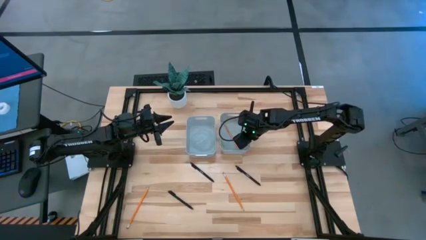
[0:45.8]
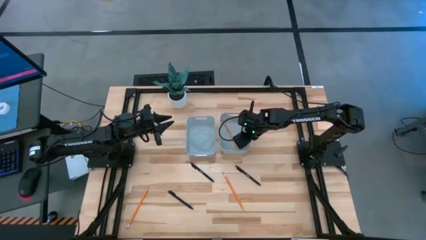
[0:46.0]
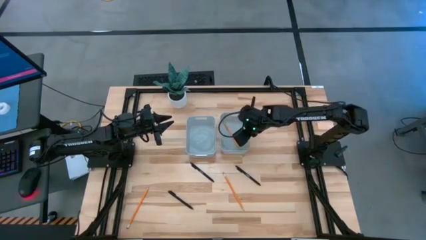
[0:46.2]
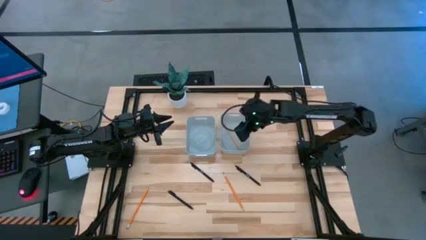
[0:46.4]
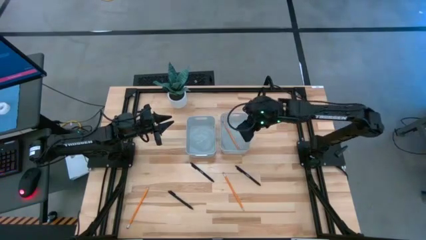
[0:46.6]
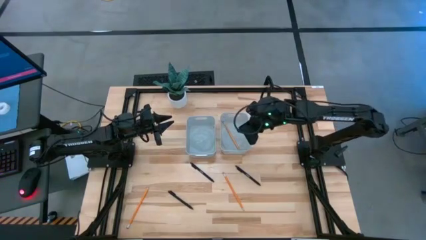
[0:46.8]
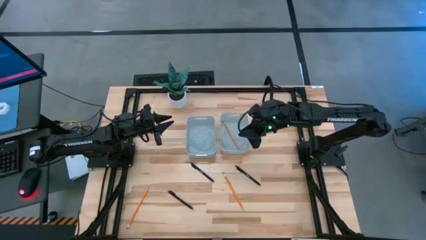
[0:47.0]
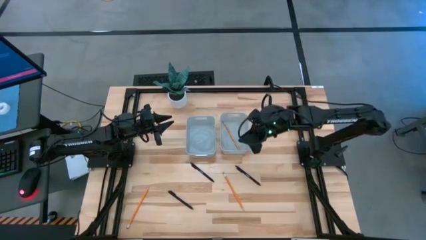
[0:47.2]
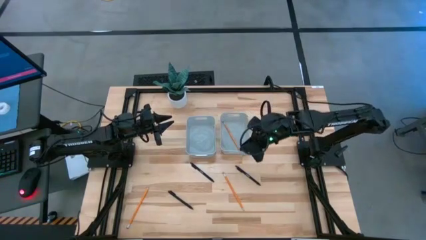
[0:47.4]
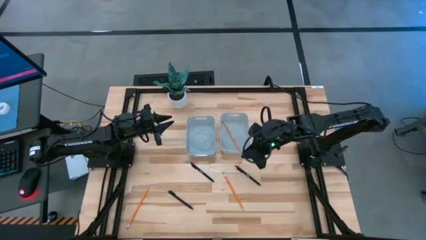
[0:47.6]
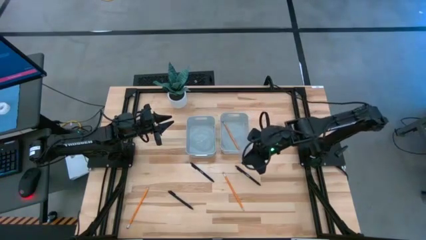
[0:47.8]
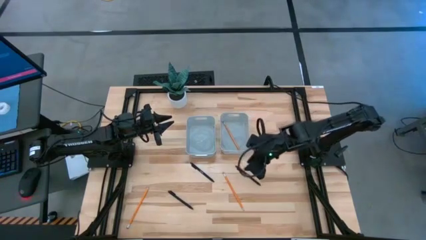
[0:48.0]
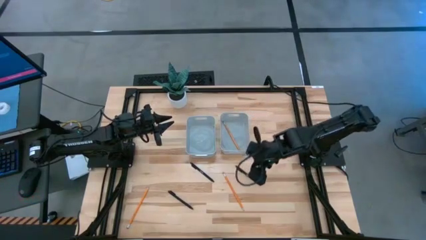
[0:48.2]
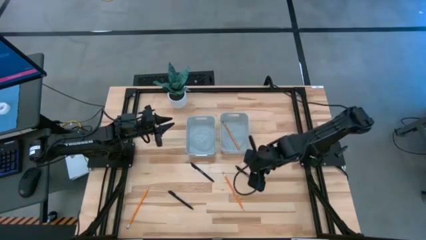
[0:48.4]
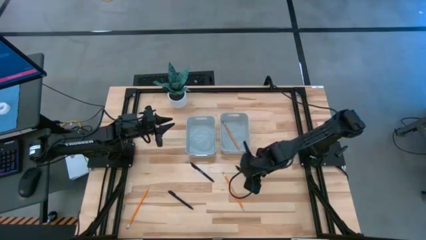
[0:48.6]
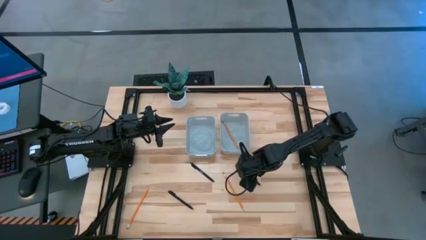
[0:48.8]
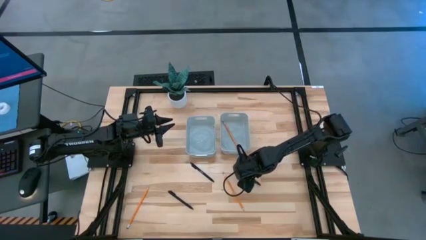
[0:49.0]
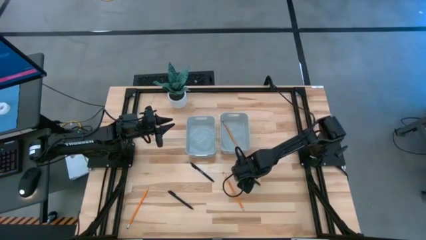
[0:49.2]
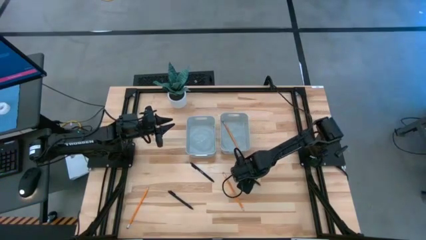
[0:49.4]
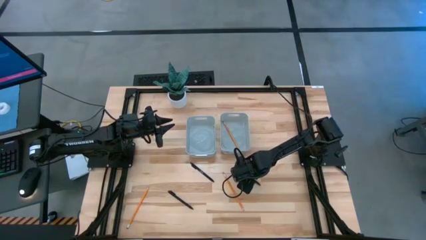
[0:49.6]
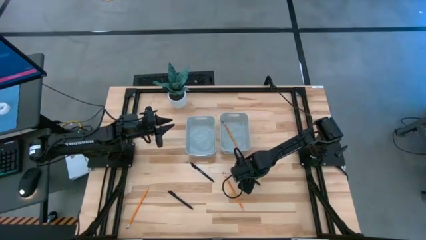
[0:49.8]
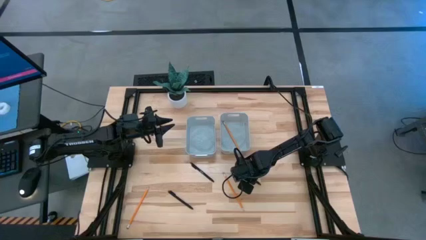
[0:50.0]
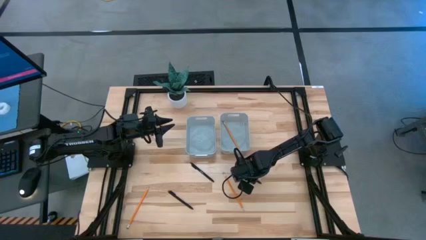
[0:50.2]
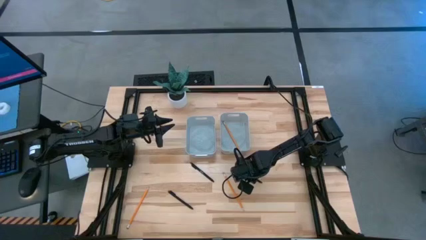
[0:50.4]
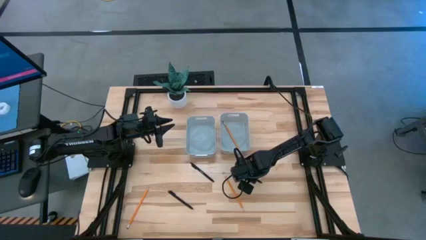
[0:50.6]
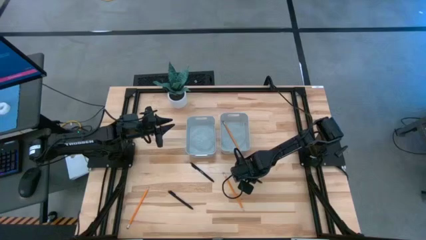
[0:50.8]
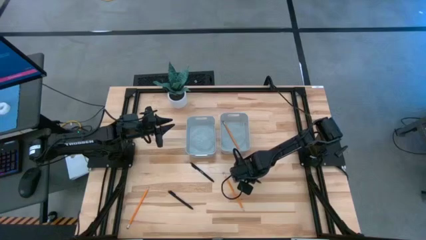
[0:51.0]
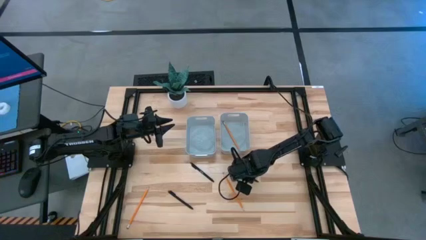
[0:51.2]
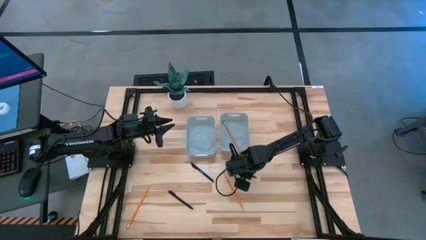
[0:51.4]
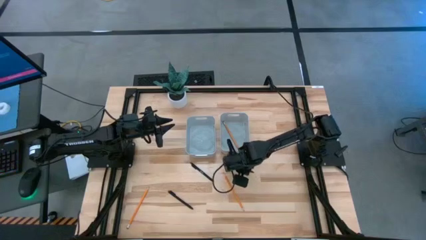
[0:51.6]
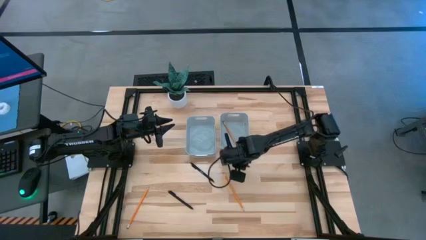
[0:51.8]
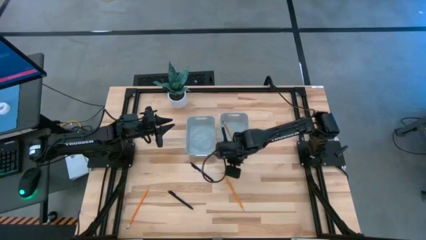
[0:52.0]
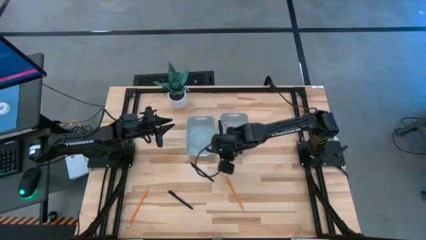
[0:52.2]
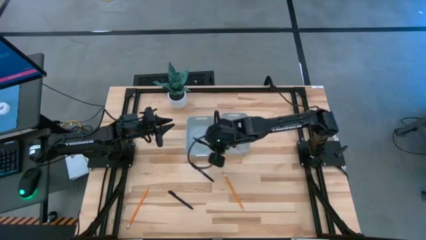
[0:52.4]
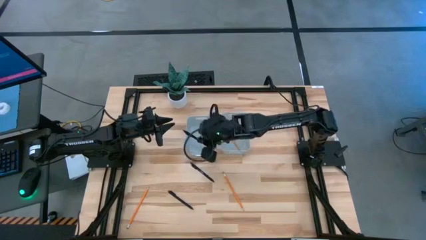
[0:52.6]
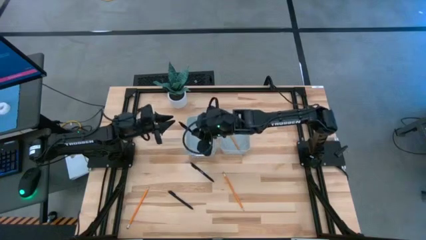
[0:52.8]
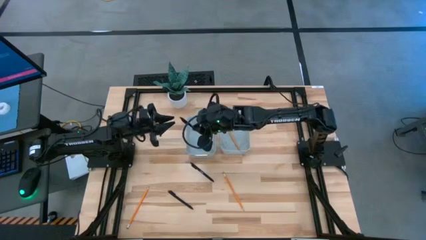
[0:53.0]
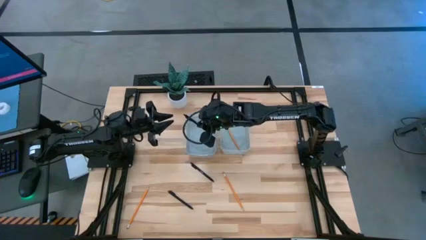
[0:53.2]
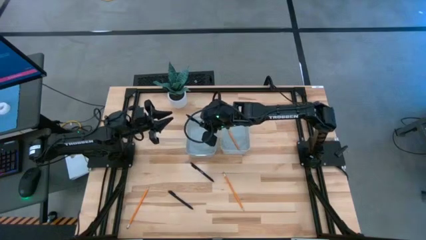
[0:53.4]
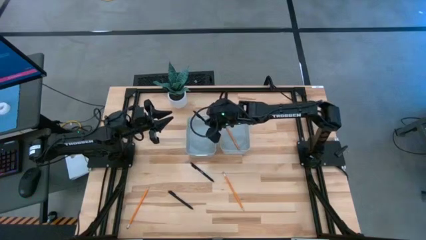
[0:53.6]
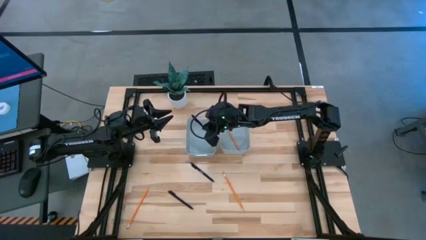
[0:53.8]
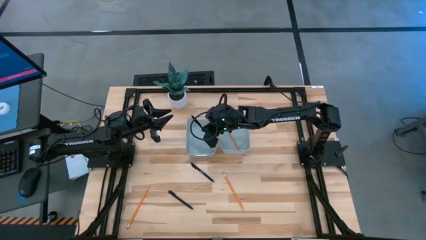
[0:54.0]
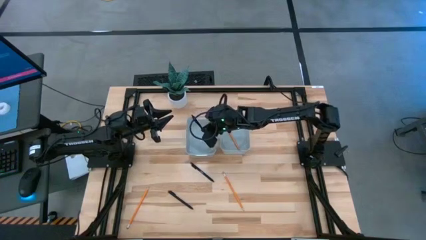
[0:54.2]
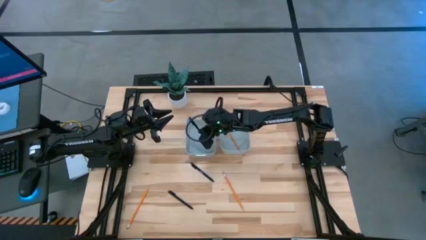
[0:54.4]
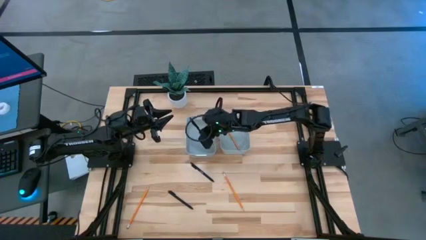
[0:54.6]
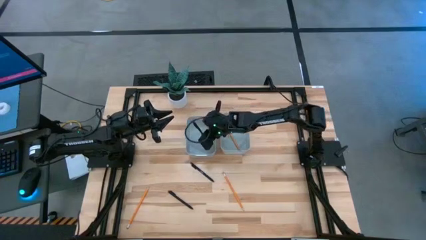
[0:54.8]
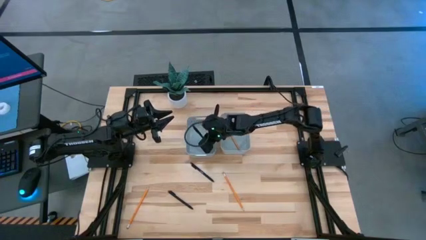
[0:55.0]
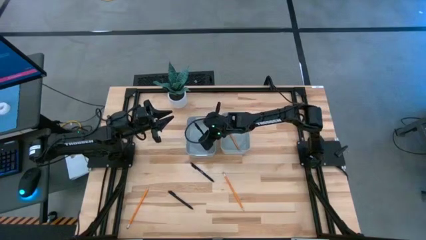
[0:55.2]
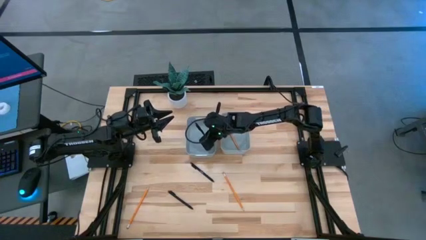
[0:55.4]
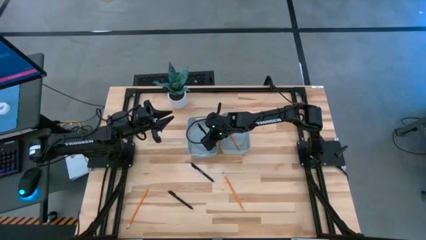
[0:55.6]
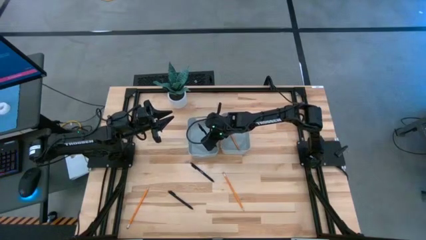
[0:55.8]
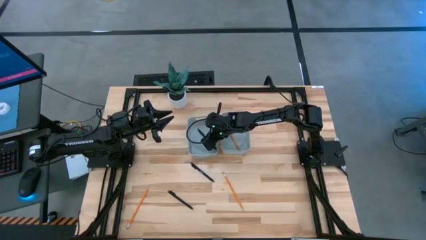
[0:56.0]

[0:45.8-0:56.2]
Task: Sort pens & pencils
Put the top right black pen into the left gray bin

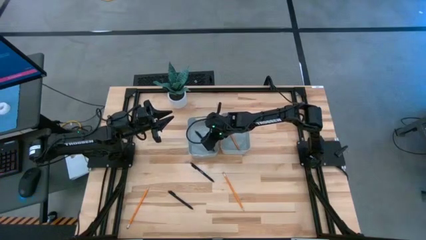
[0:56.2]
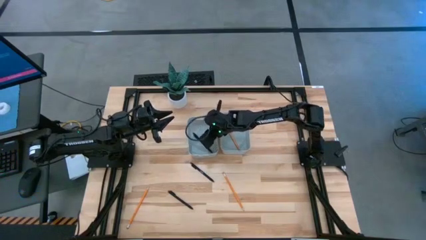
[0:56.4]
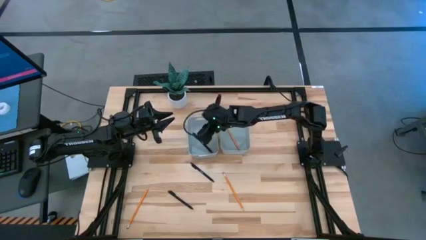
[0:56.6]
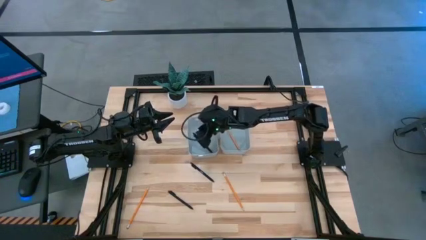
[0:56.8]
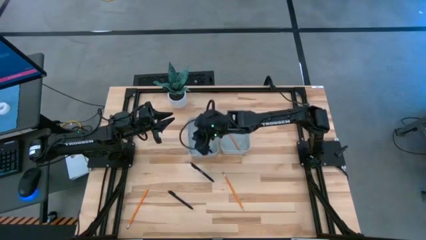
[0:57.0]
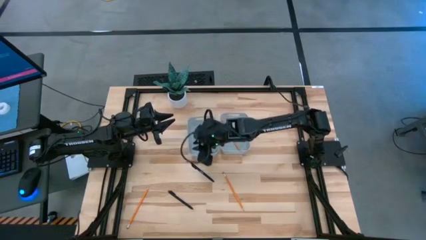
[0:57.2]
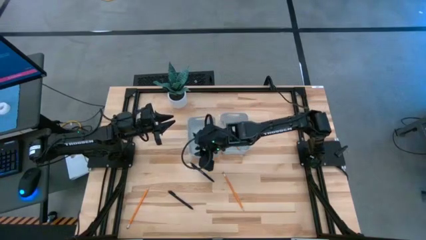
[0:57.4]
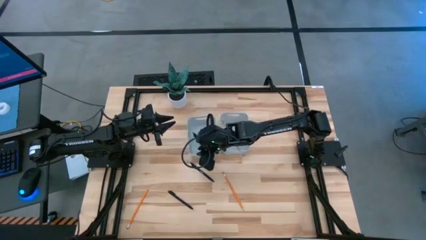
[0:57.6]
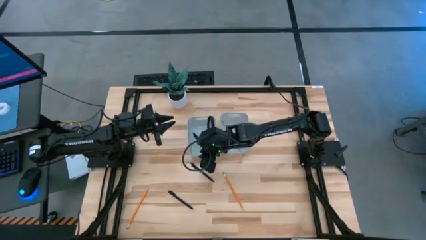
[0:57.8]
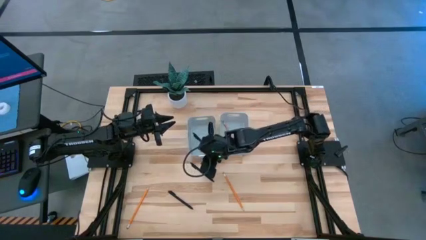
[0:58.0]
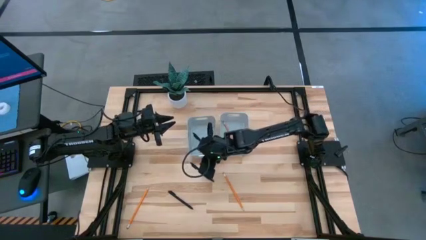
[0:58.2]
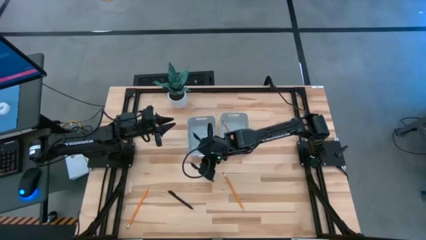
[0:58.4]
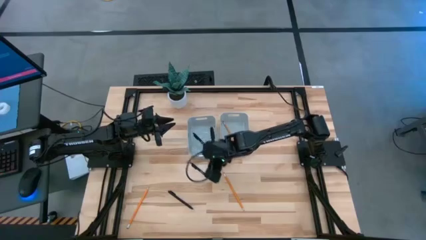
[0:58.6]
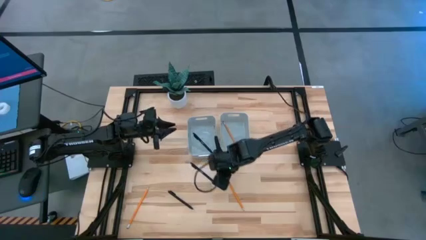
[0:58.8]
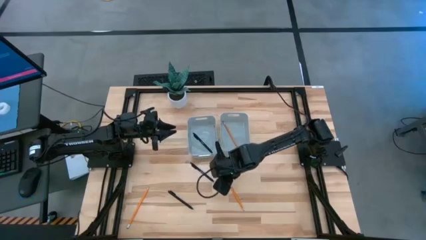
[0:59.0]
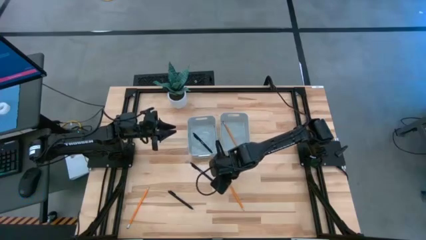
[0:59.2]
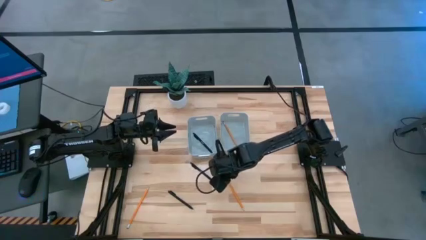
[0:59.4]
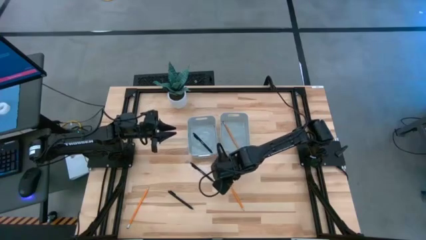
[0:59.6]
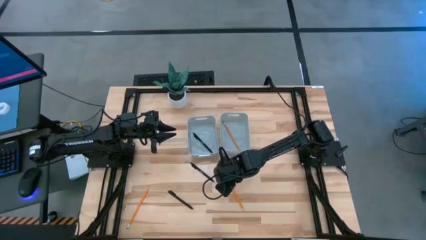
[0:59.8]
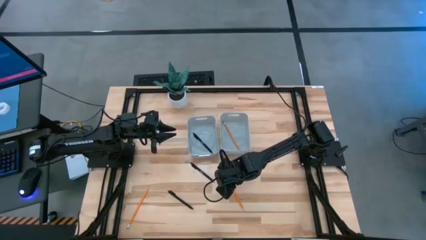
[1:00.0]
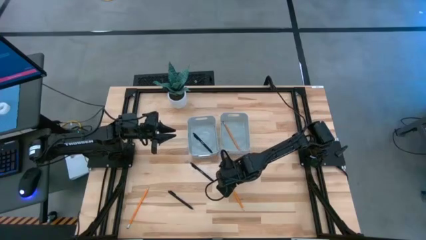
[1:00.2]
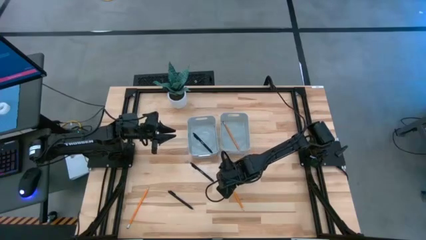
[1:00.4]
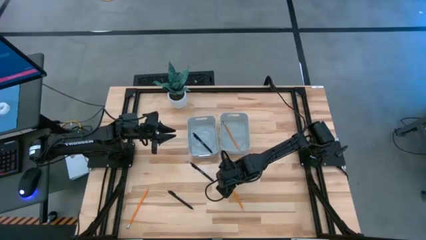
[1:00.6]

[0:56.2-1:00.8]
Put the right orange pencil into the right gray bin

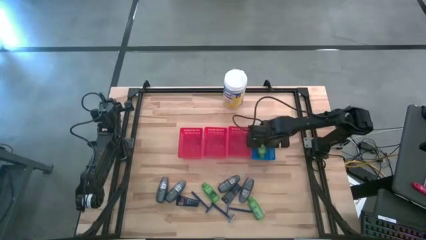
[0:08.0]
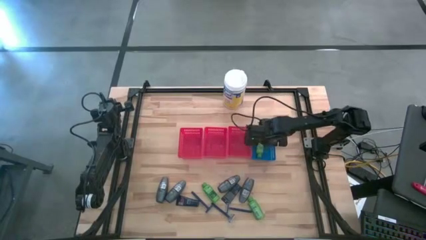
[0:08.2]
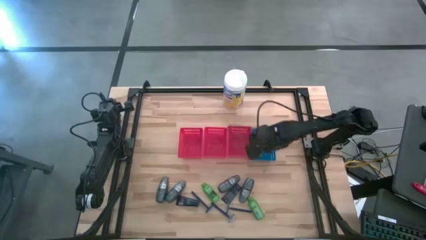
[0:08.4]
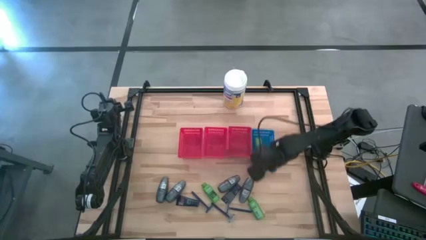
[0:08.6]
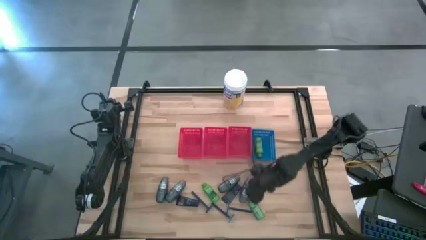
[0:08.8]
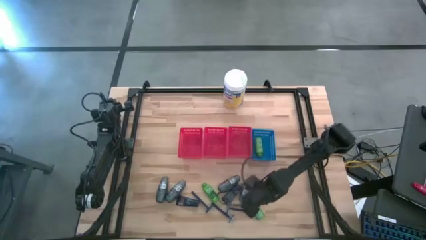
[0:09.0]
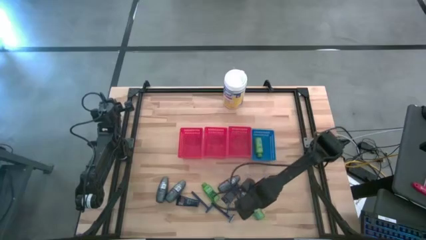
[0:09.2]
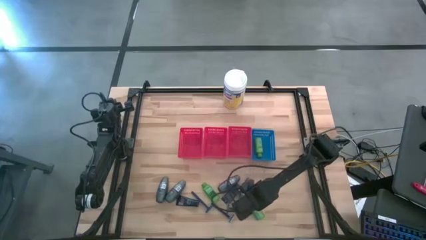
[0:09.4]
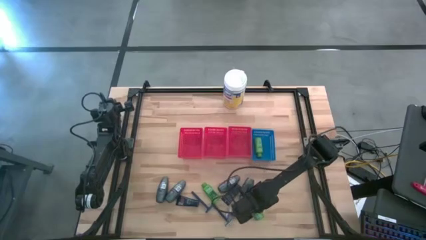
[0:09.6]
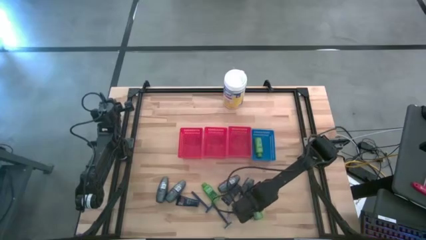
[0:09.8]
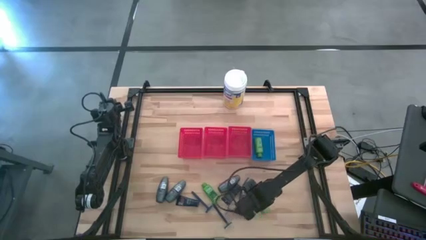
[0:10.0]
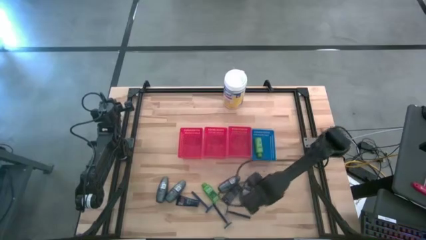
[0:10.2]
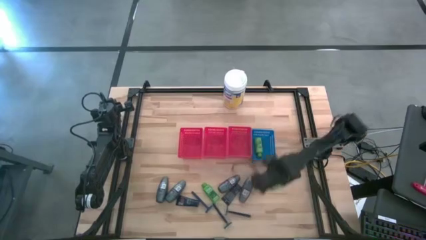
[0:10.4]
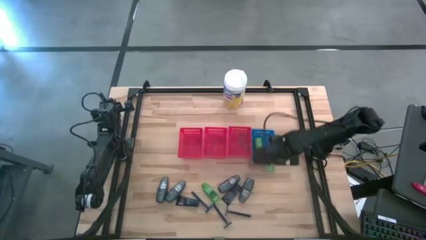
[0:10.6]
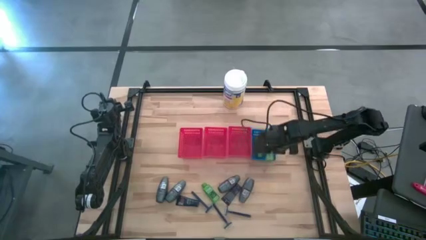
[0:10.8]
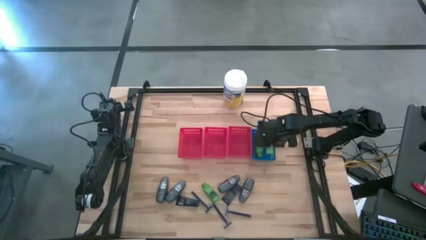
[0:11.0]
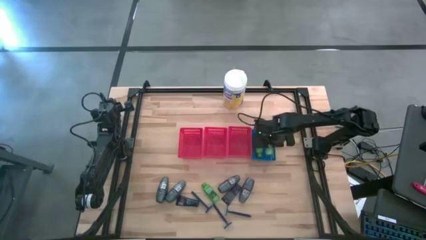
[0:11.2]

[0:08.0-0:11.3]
Task: Pick & Place Travel size toiletries
Put the green shampoo into the blue bin
